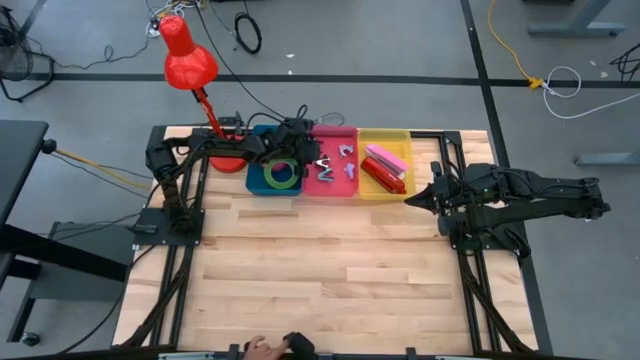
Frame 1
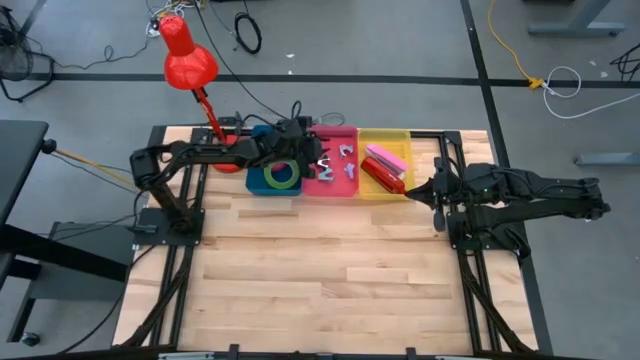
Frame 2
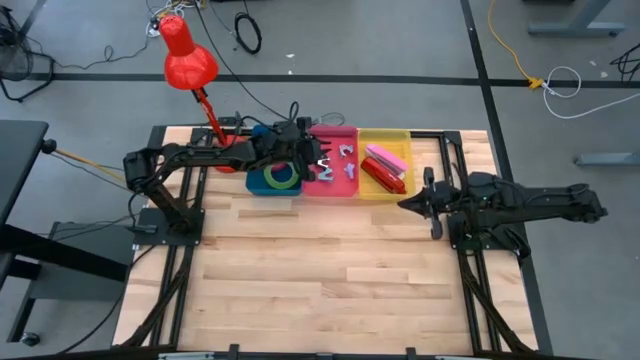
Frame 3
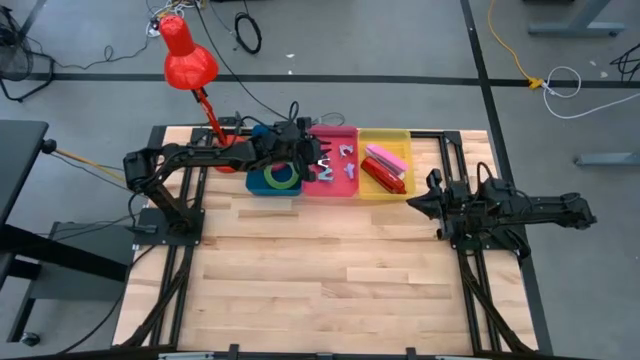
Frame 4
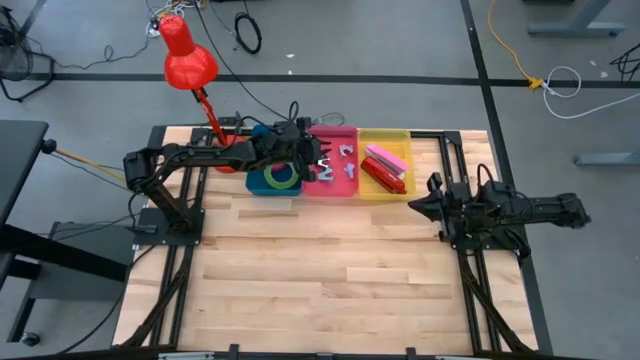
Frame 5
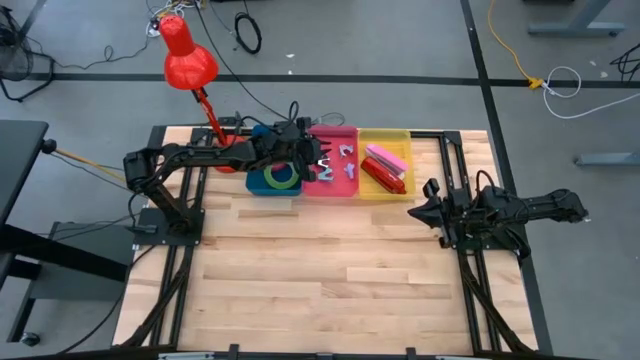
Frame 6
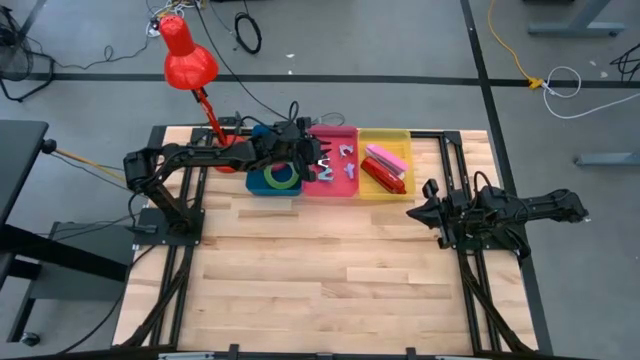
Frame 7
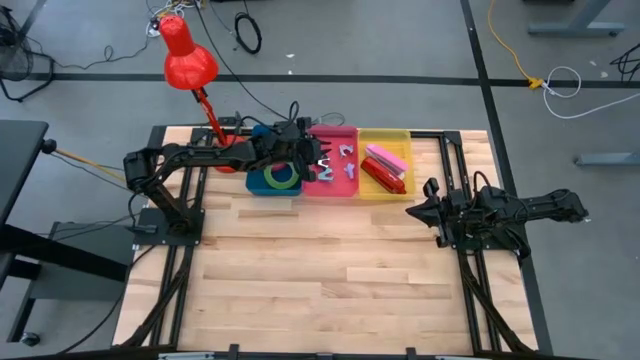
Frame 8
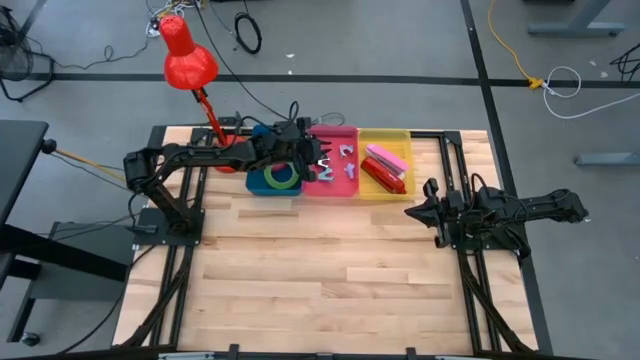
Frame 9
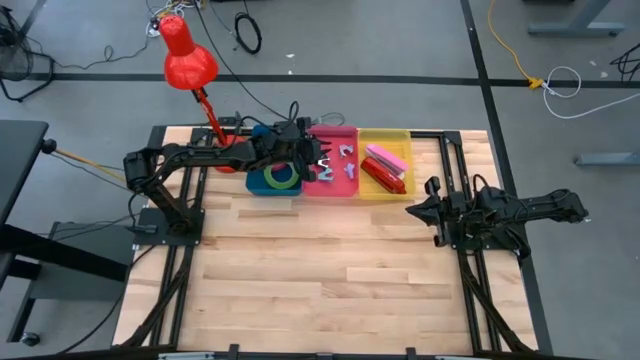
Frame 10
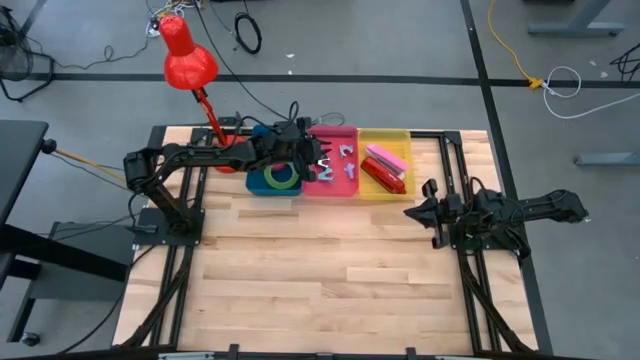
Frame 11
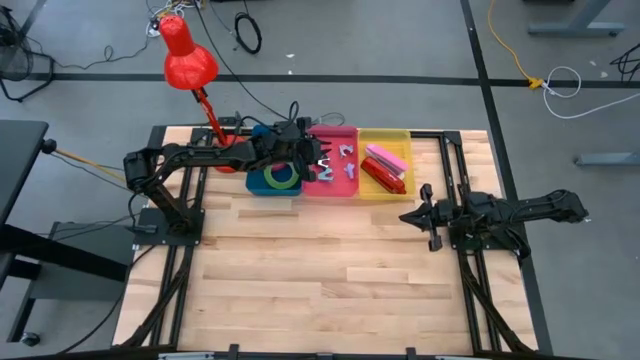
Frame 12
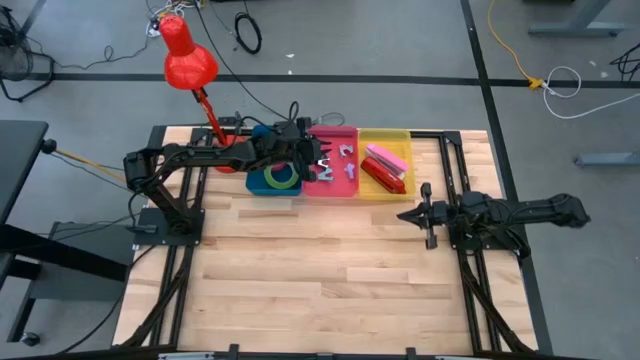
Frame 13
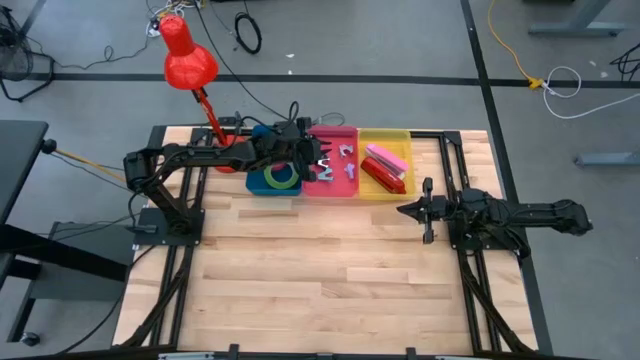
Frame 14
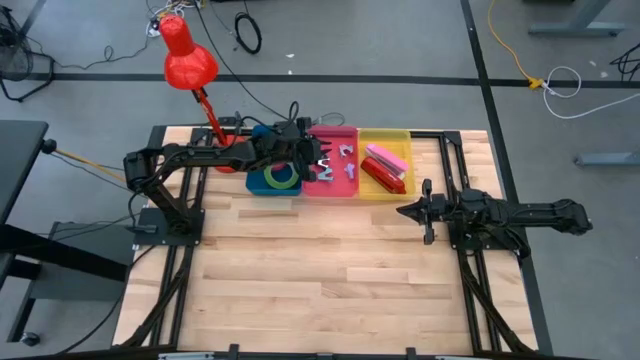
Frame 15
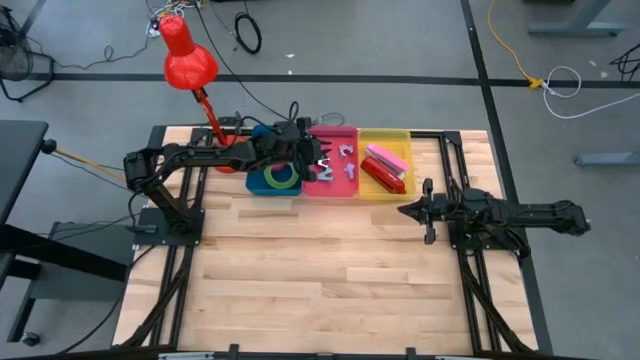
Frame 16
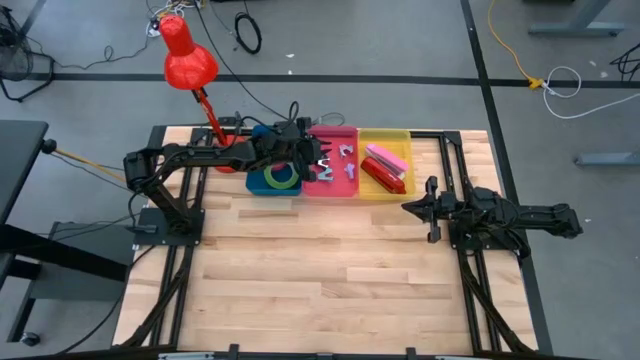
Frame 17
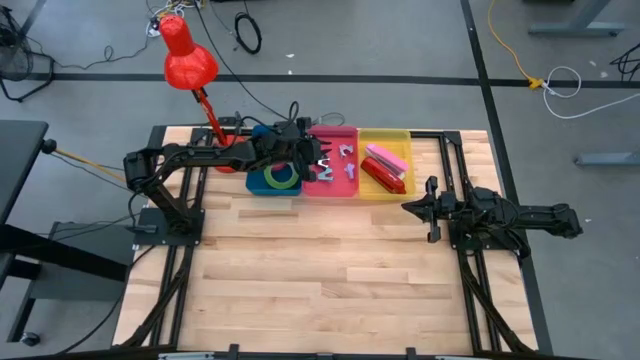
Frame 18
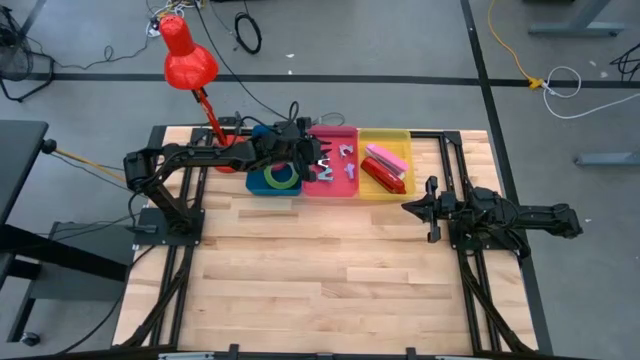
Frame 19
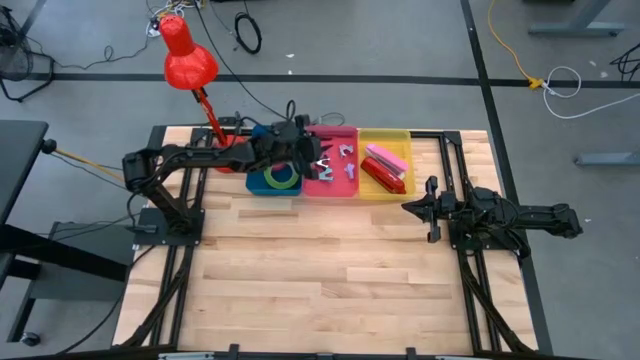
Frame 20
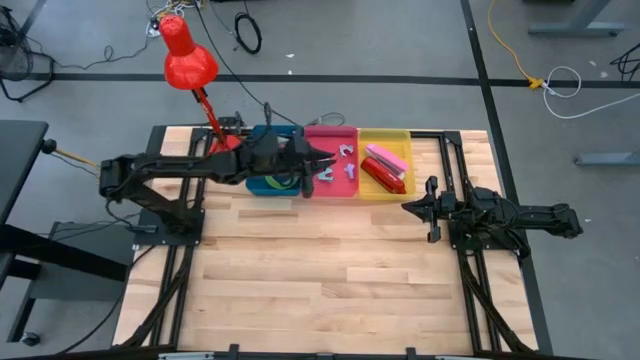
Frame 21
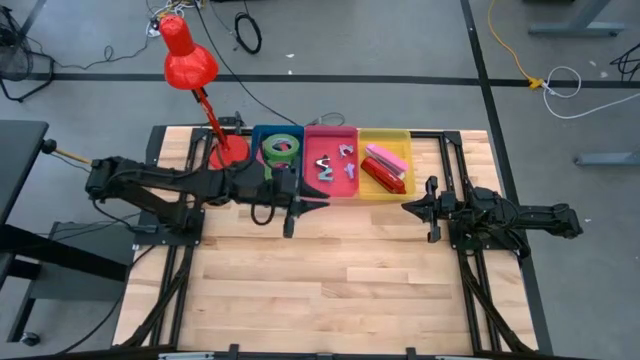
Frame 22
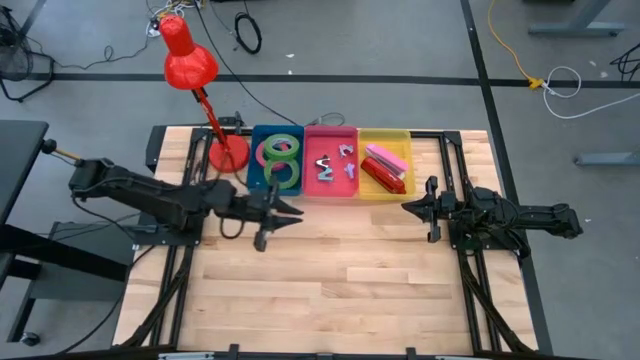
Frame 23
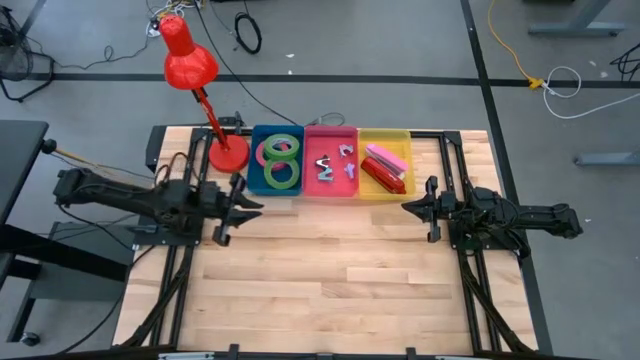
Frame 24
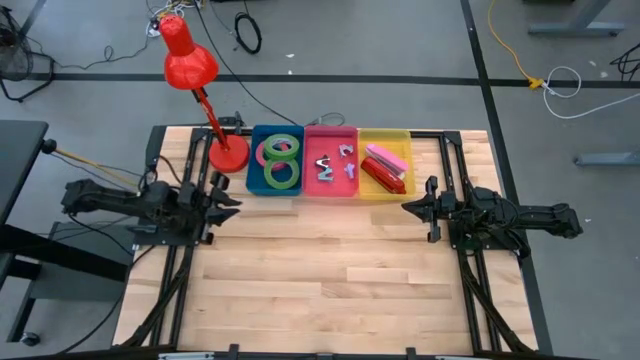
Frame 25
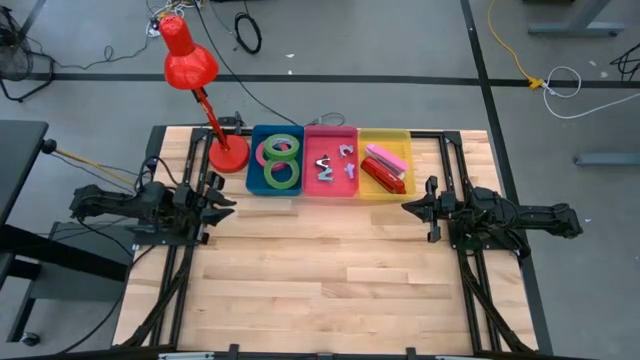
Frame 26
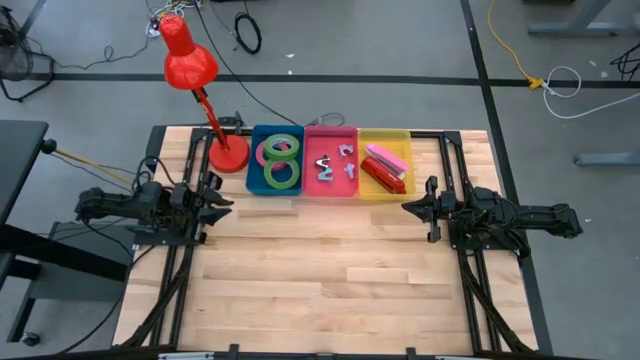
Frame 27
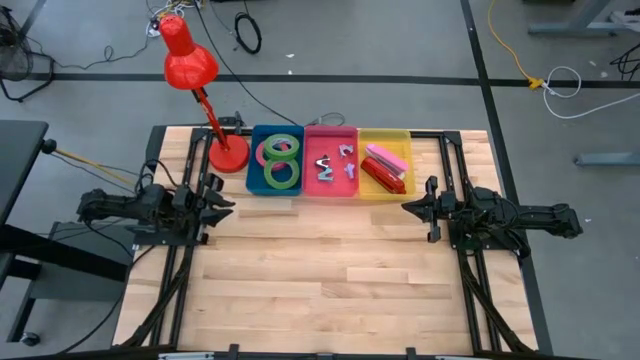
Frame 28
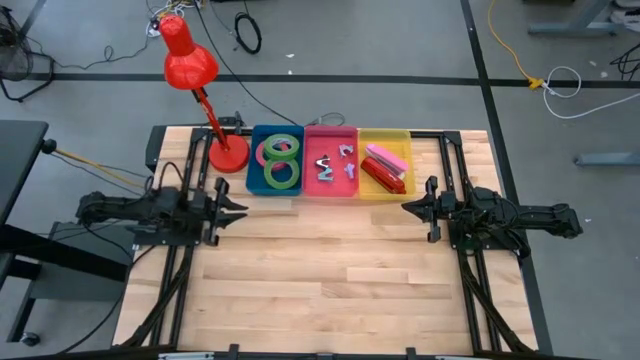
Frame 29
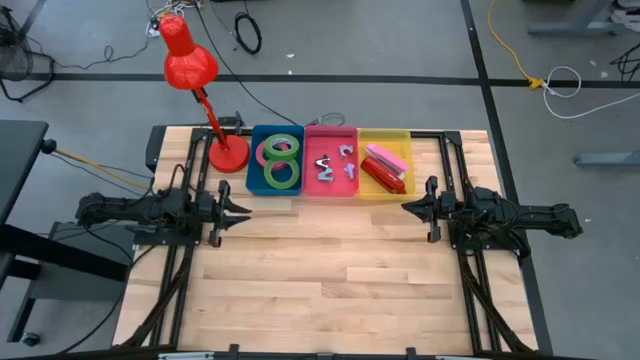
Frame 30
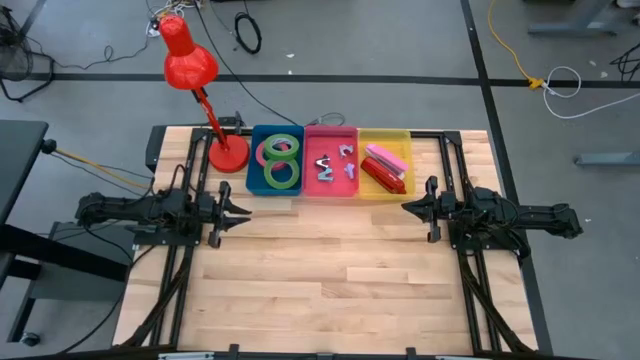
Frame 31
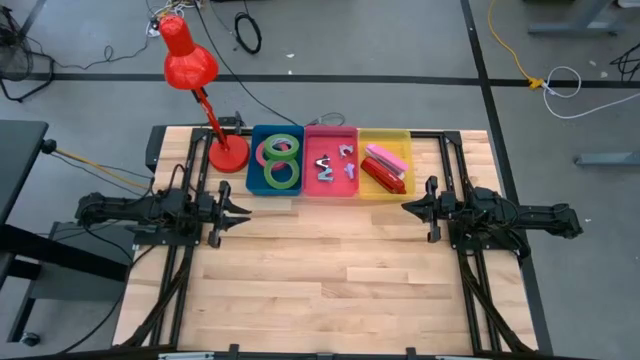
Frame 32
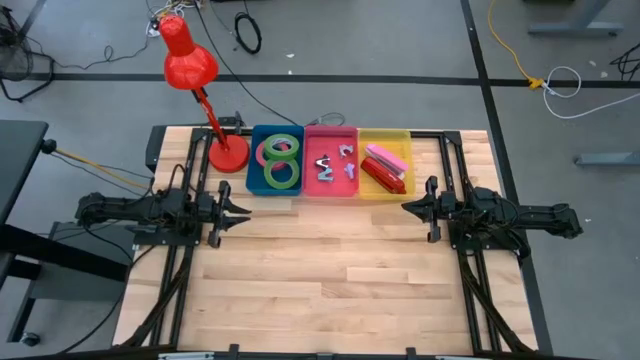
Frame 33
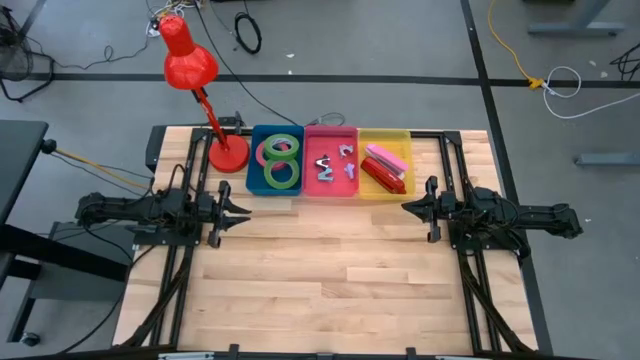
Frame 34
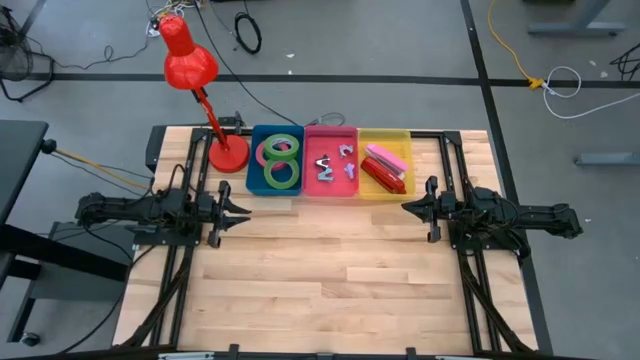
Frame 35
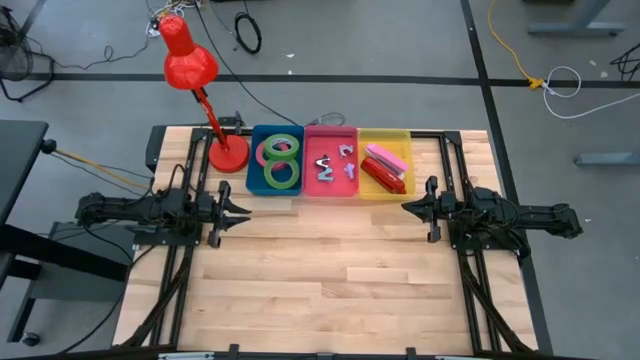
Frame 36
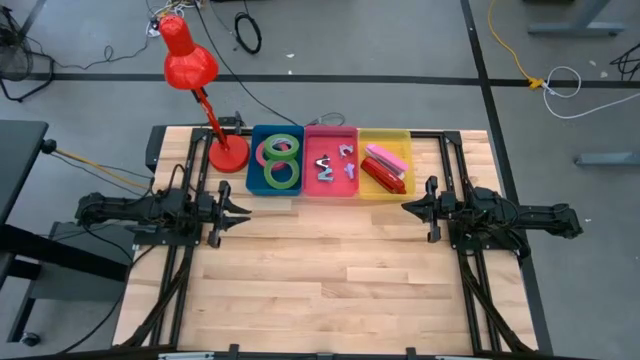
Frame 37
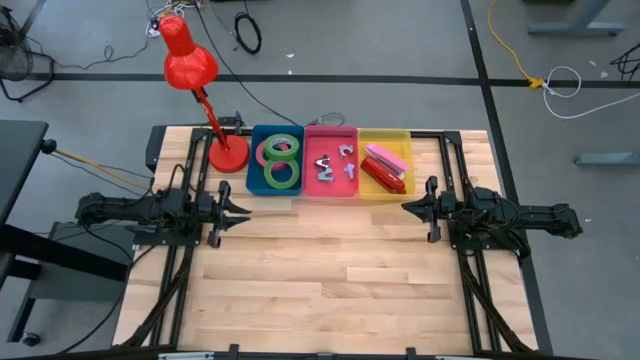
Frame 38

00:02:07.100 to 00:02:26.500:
Task: Pick and place Stapler, Stapler remover, tape
Return to Home Position
